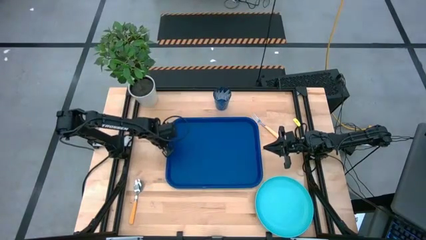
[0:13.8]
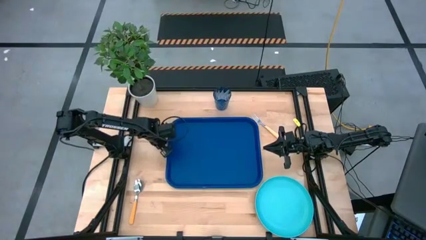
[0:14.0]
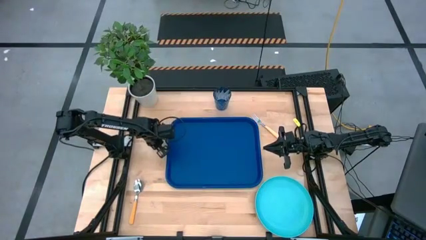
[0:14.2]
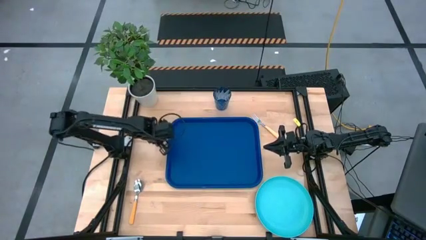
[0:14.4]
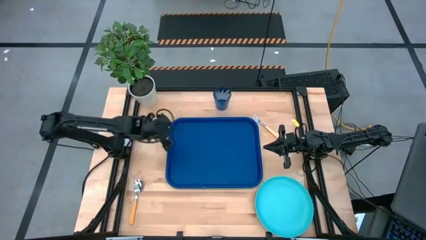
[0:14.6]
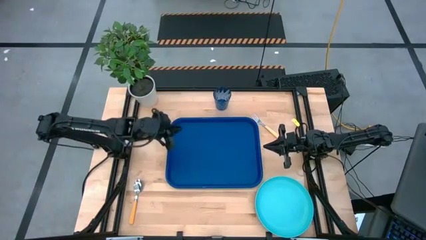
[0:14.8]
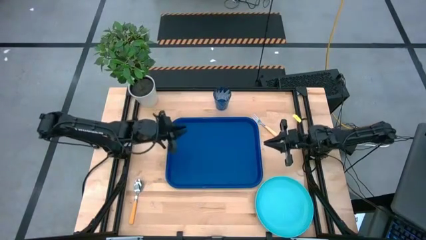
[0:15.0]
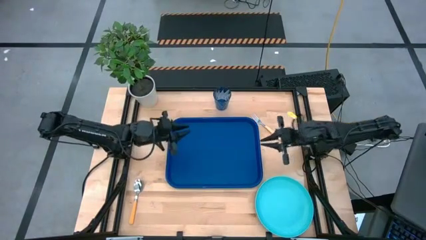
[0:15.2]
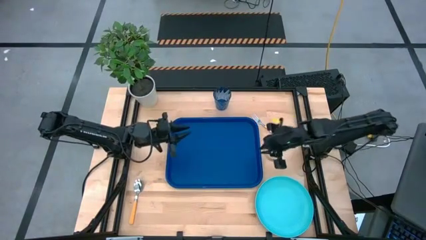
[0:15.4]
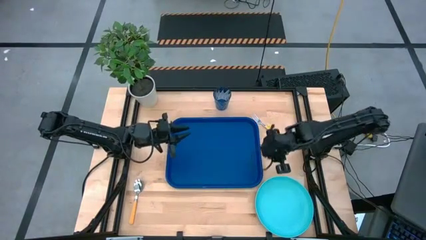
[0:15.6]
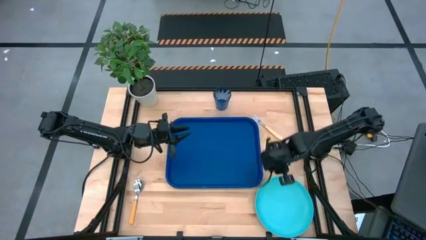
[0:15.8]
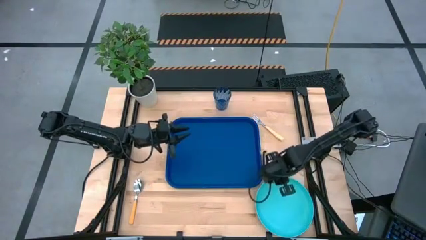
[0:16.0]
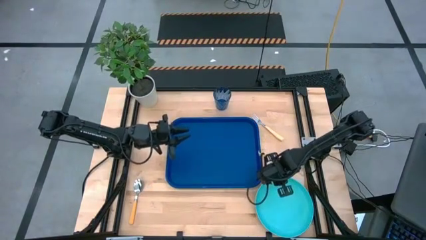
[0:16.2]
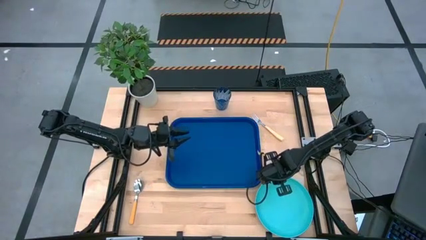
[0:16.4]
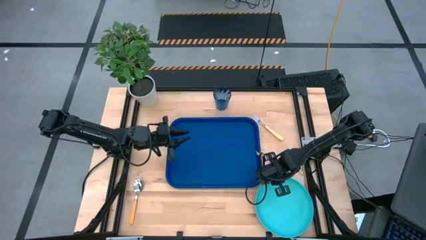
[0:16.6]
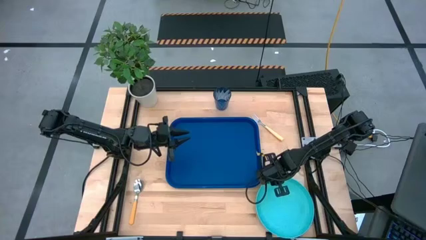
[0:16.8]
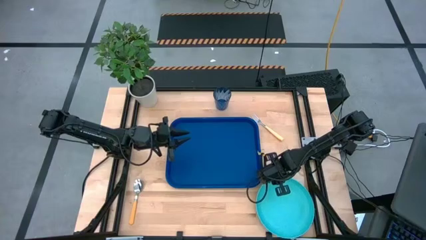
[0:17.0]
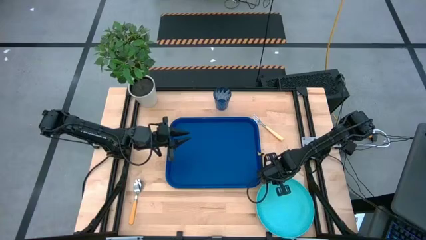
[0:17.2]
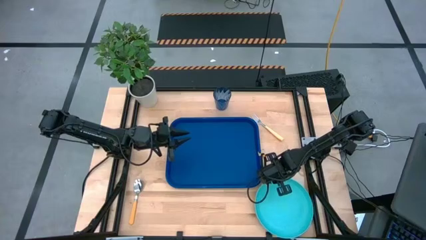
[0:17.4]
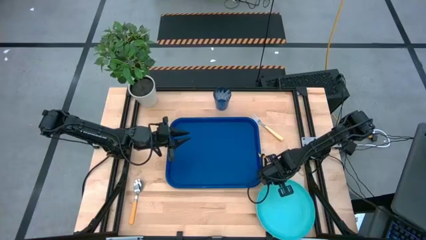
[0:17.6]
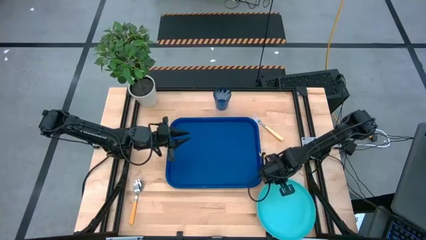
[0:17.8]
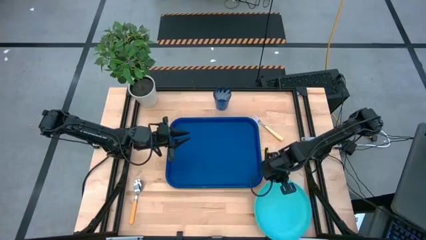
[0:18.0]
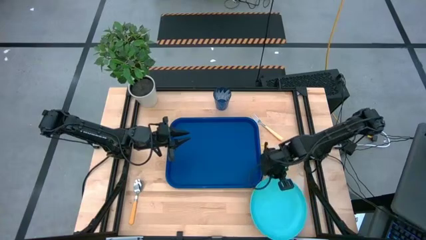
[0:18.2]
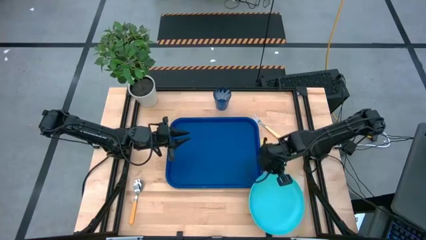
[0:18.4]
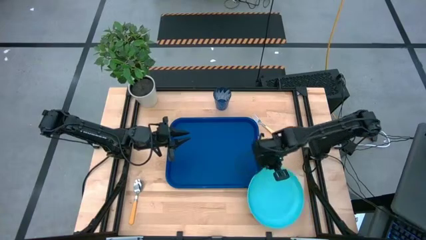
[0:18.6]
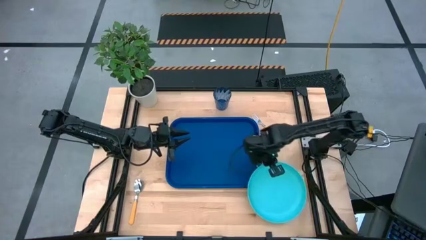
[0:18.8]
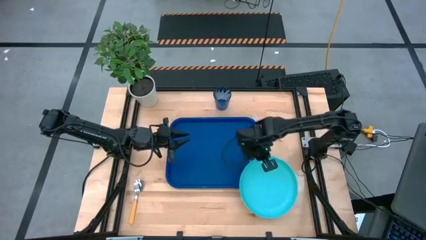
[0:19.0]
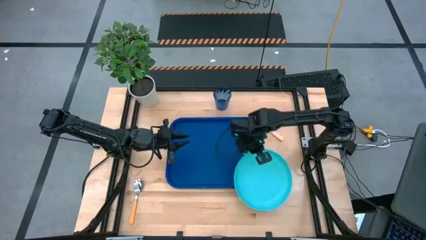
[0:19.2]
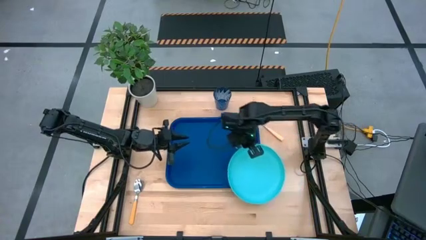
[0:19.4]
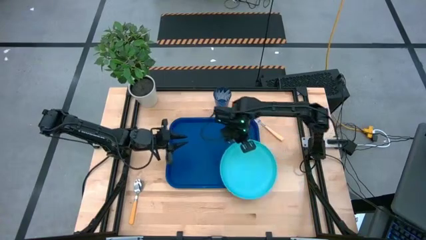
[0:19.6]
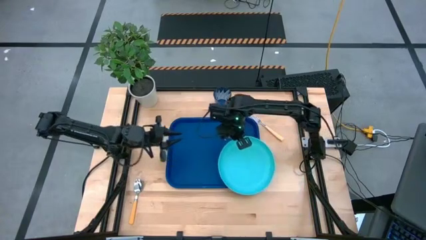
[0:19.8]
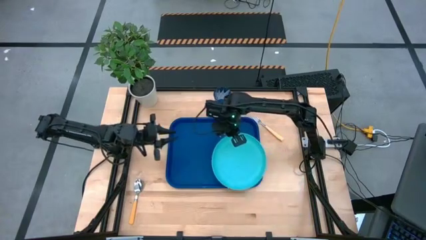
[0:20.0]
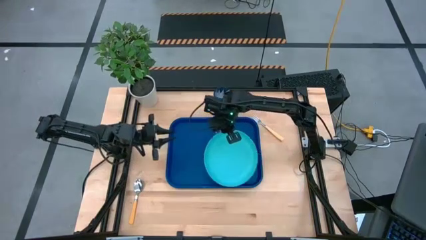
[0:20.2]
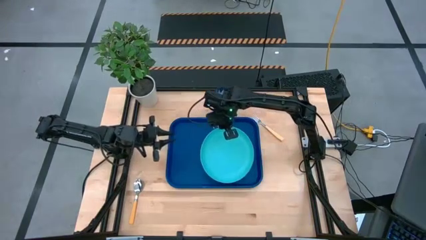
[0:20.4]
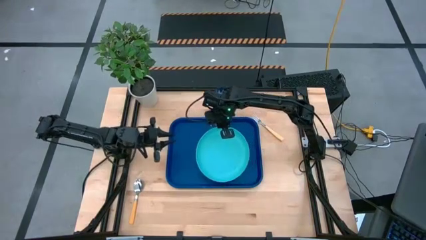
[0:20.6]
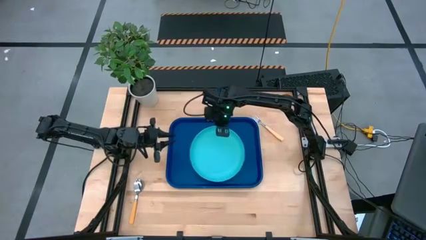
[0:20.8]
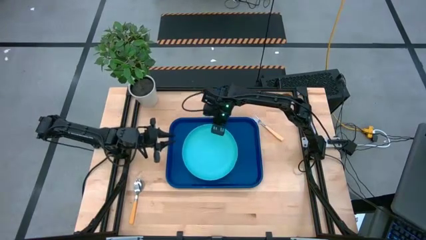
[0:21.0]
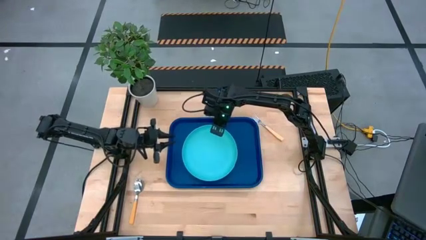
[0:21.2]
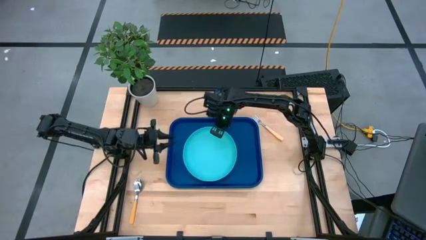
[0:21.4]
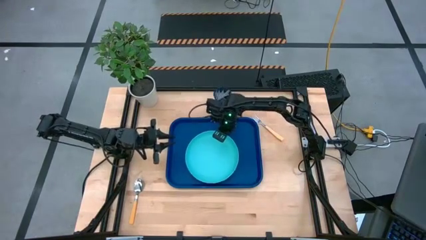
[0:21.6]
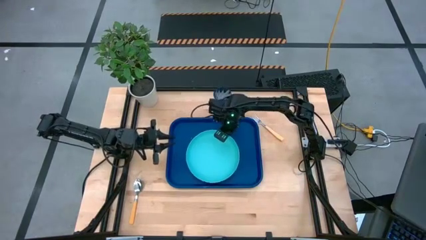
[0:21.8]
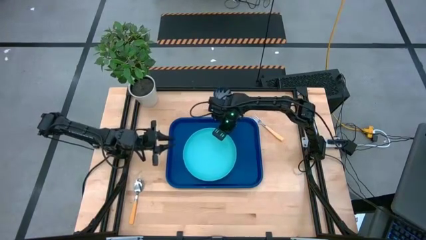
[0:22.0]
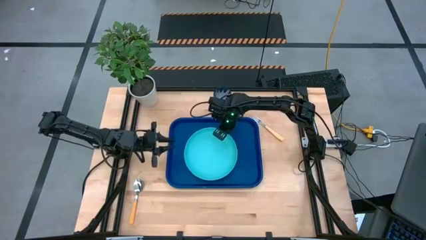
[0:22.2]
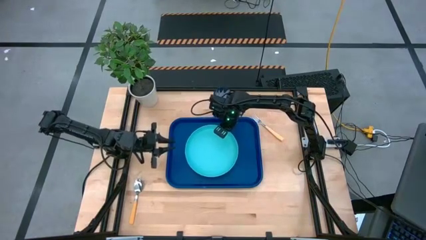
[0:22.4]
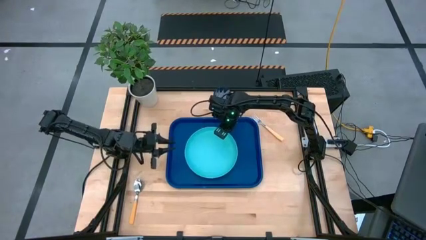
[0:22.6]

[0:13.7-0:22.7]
Task: Pick and place plate/cup/fork/spoon on tray
Put the blue plate on the blue serving tray

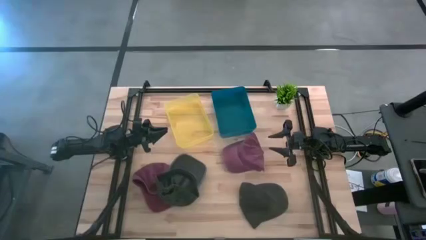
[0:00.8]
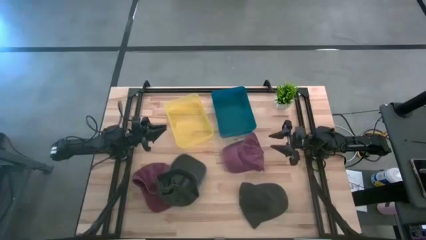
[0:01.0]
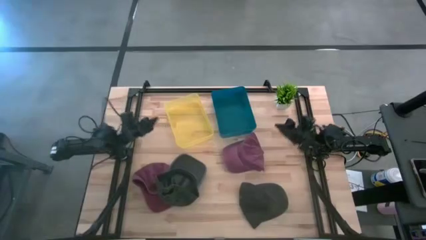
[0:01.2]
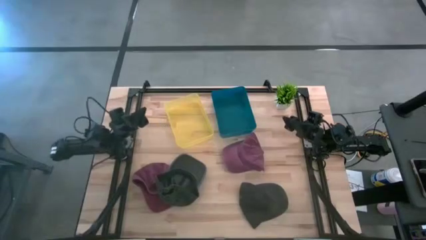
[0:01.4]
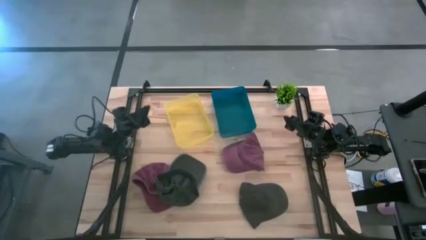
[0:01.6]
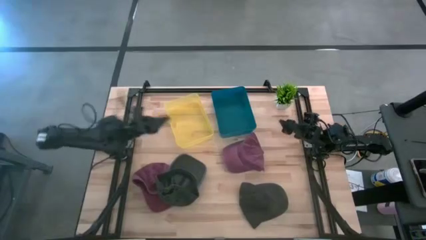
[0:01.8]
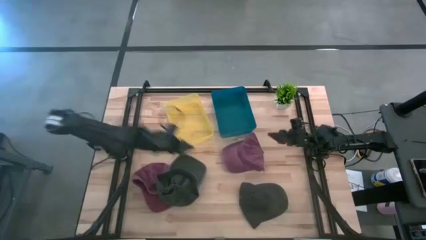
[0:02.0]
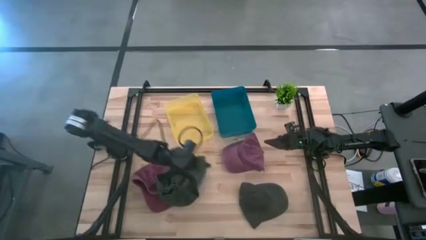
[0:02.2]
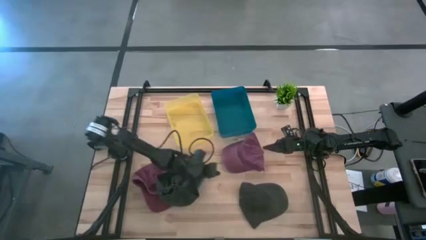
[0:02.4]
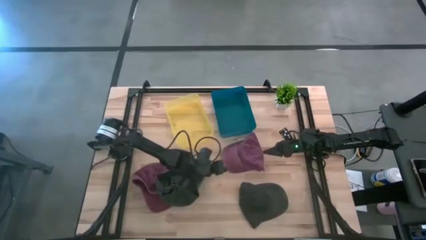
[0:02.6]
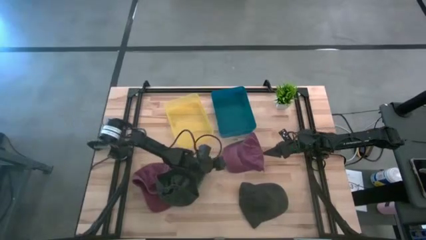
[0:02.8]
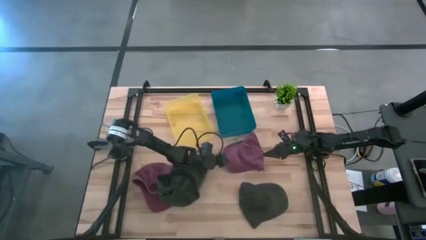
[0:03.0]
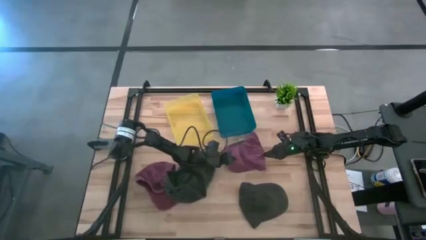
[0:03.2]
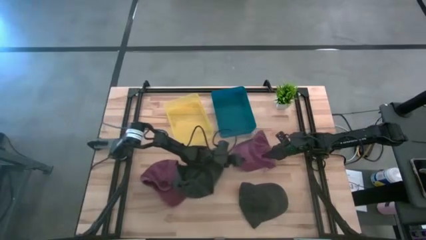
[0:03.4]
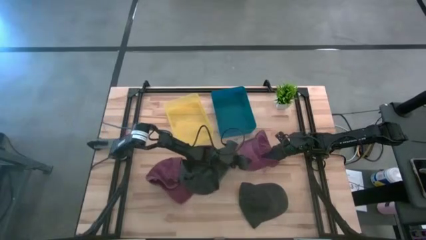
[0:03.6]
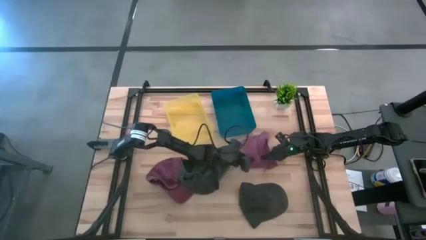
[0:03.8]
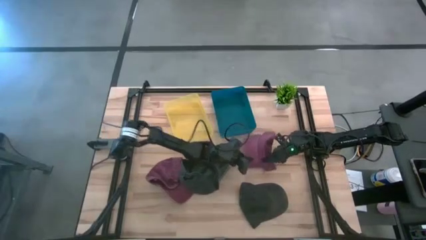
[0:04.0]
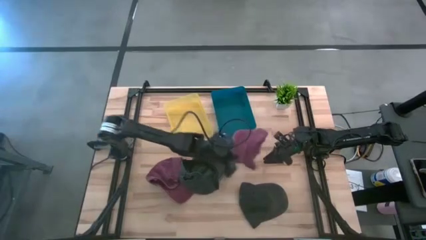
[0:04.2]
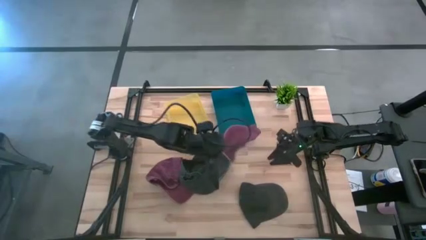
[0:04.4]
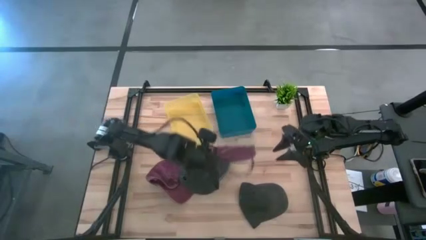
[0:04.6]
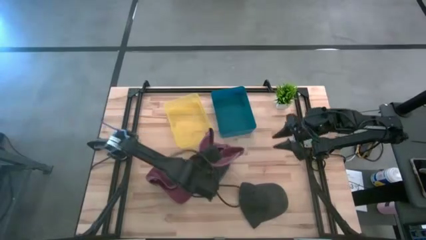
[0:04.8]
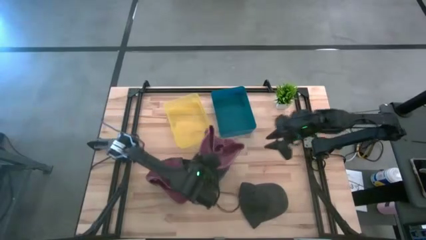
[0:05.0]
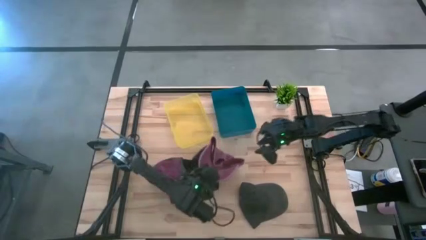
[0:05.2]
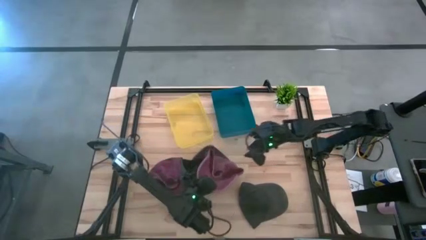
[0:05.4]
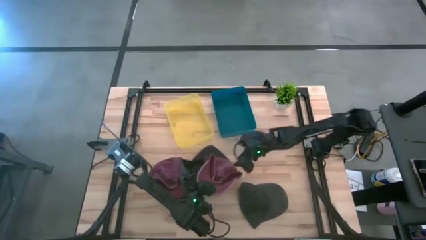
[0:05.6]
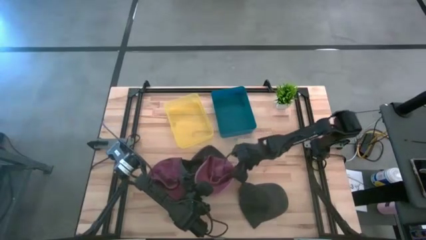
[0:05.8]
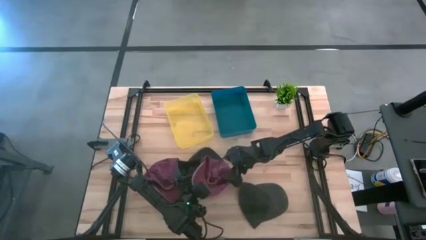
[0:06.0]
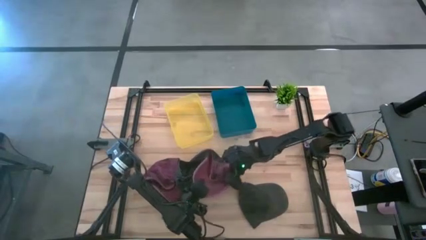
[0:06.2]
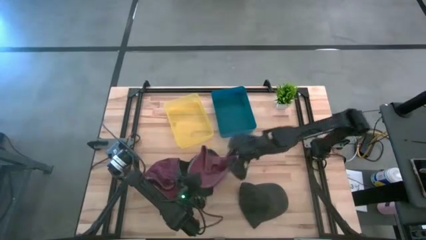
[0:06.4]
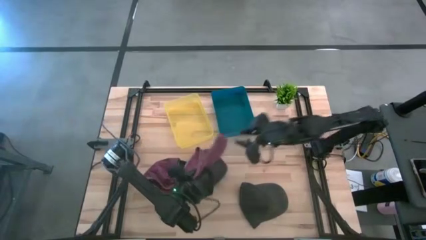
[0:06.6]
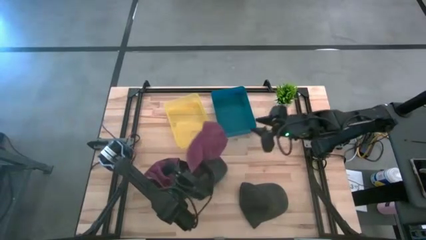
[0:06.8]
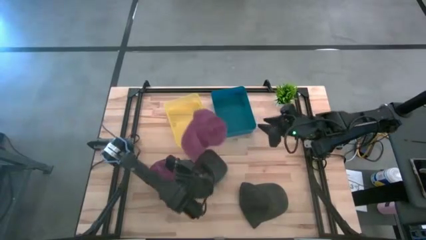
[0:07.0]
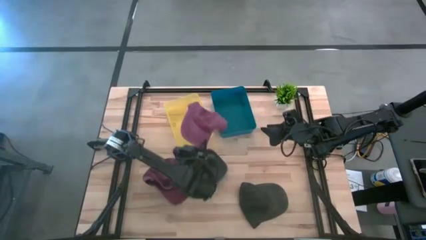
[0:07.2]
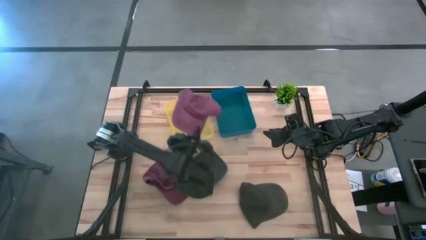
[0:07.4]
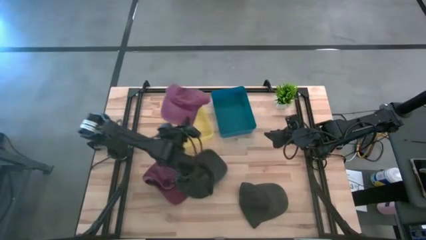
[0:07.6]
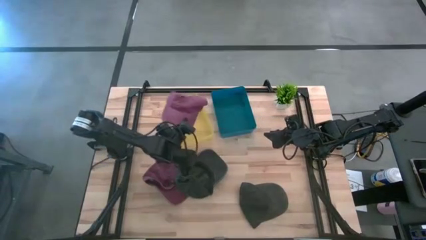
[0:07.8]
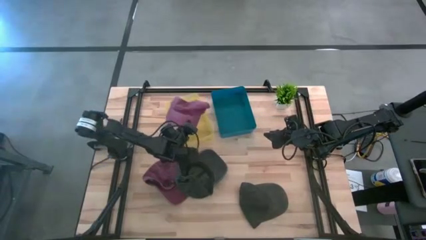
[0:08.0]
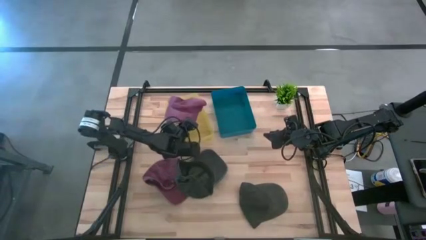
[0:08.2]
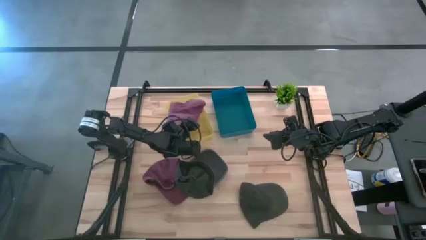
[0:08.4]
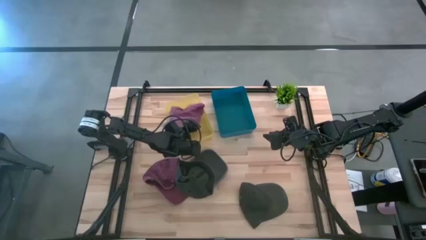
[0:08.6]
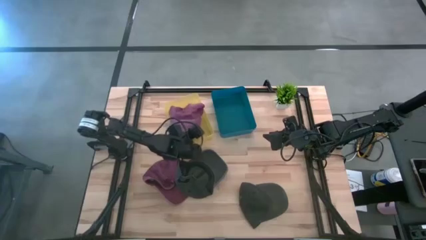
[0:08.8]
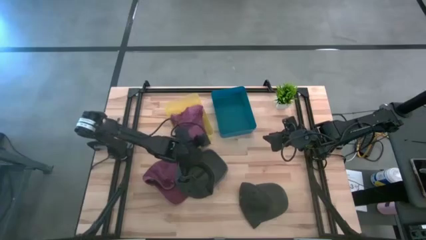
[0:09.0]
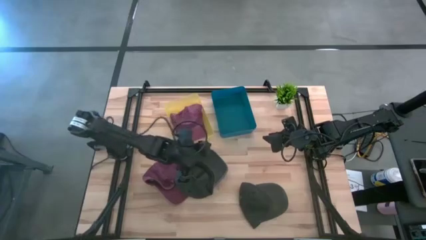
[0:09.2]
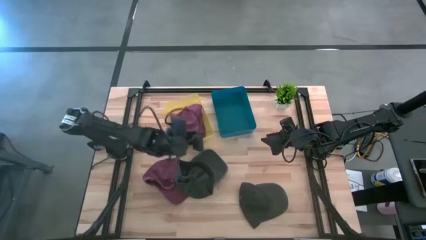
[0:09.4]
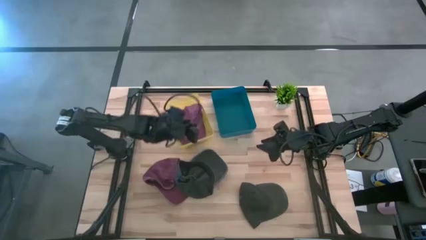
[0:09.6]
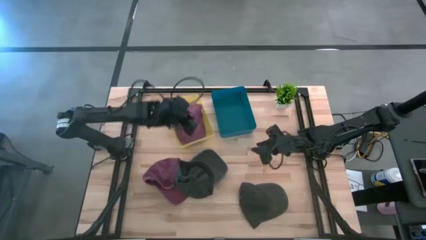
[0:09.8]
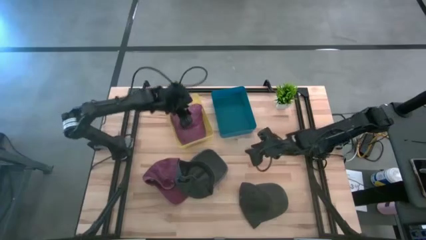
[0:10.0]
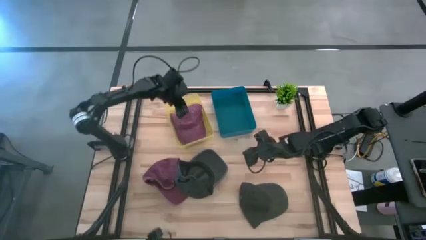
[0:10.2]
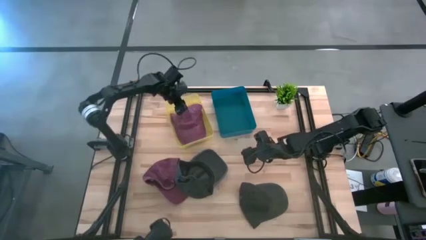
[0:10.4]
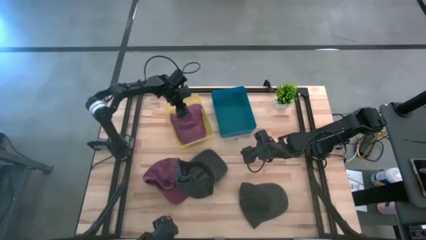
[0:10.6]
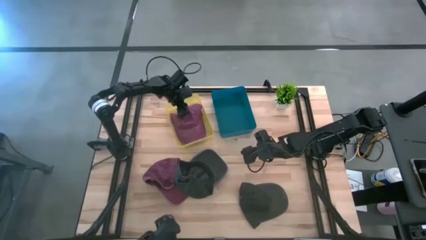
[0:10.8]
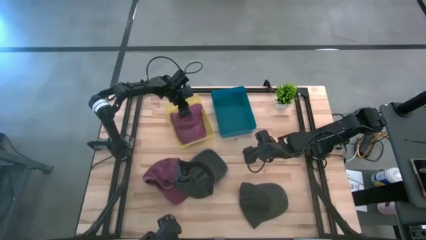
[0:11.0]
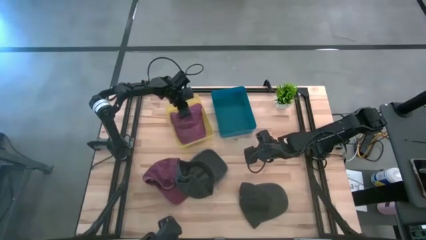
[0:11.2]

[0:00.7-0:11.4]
Task: Pick & Place hat
Put the right red cap into the yellow bin
